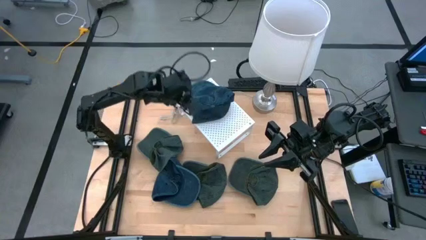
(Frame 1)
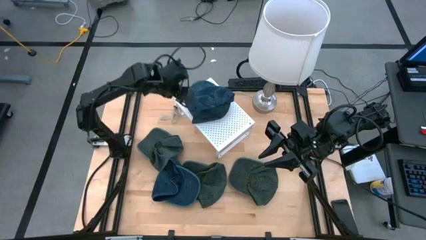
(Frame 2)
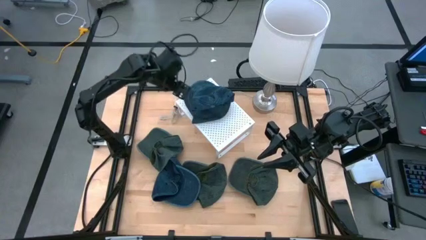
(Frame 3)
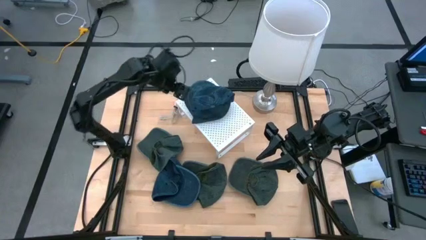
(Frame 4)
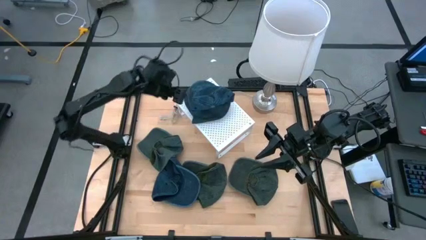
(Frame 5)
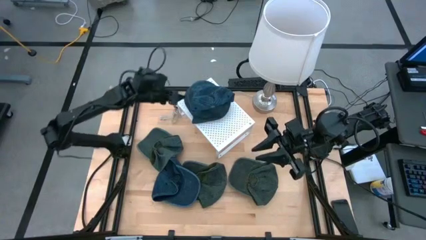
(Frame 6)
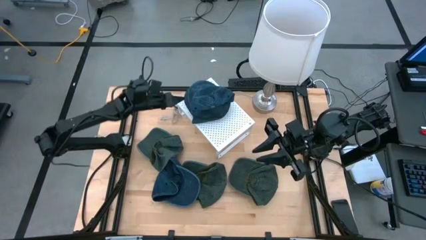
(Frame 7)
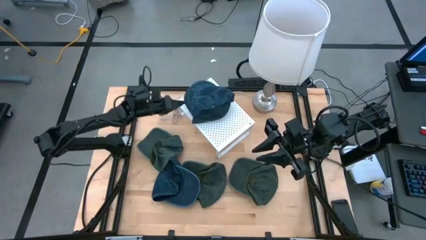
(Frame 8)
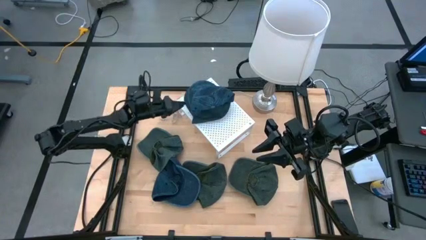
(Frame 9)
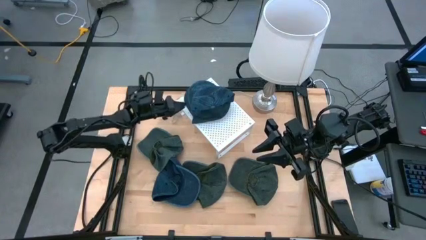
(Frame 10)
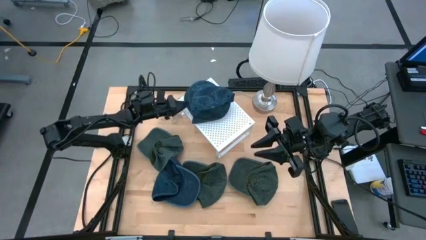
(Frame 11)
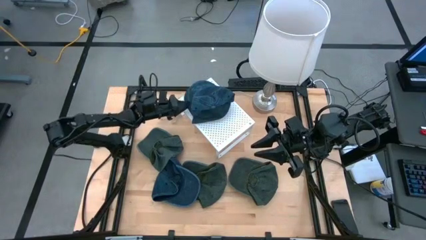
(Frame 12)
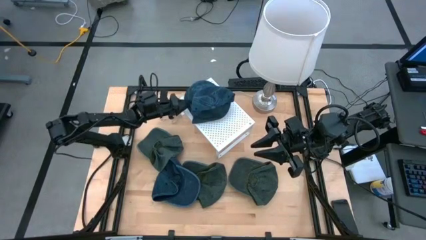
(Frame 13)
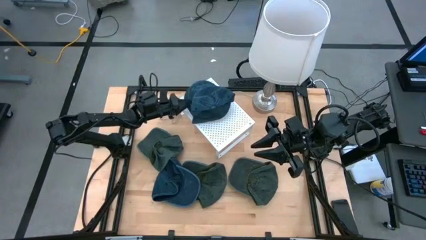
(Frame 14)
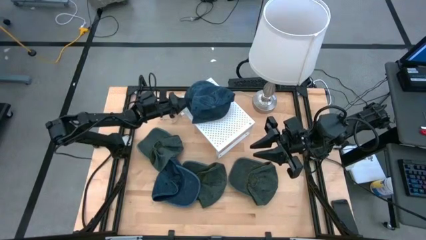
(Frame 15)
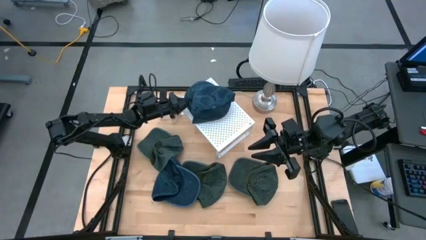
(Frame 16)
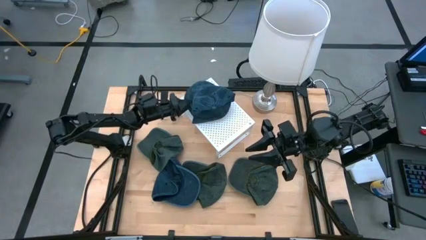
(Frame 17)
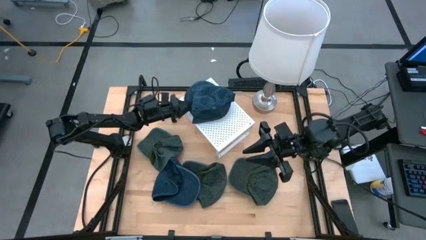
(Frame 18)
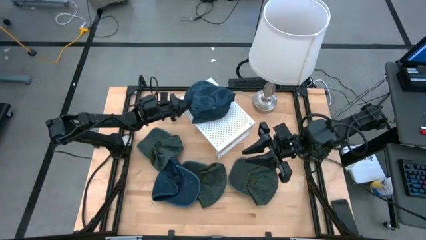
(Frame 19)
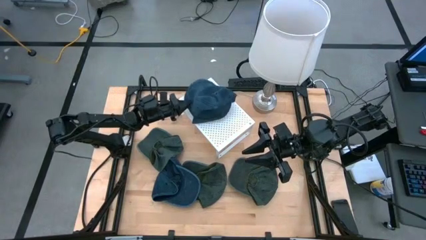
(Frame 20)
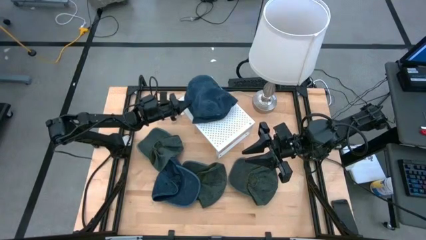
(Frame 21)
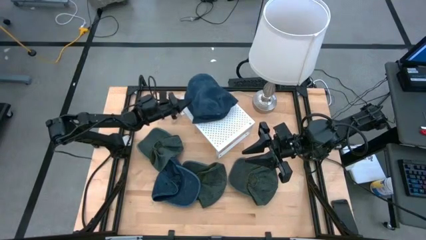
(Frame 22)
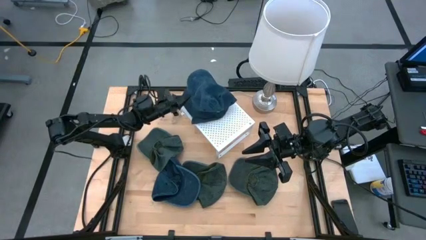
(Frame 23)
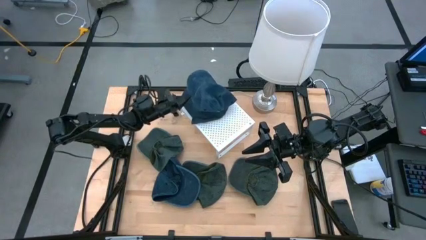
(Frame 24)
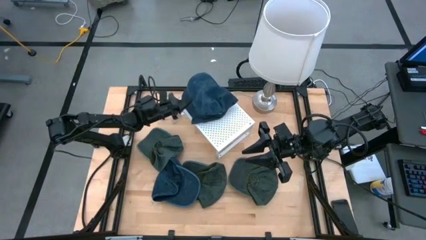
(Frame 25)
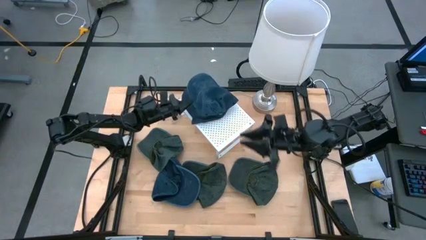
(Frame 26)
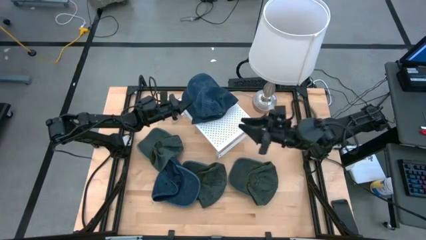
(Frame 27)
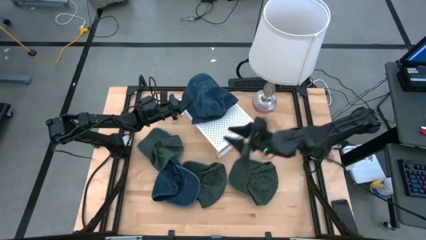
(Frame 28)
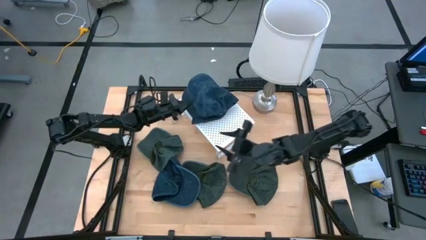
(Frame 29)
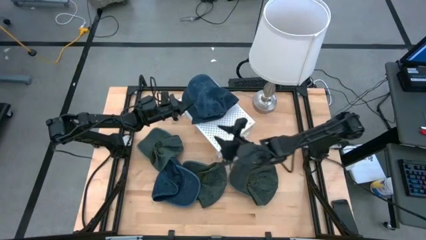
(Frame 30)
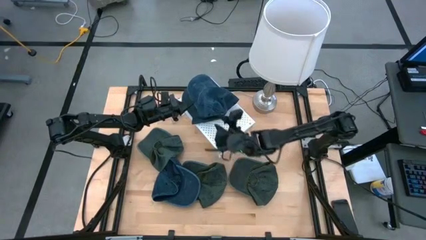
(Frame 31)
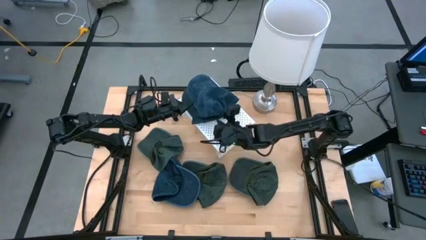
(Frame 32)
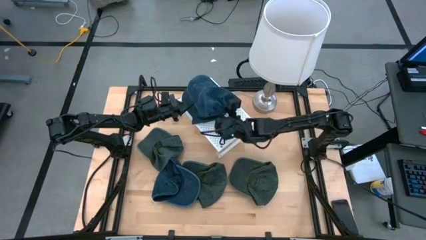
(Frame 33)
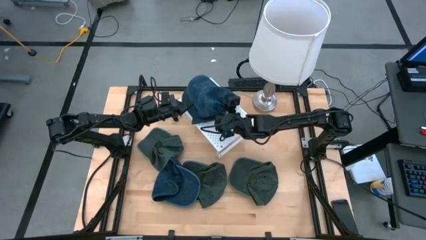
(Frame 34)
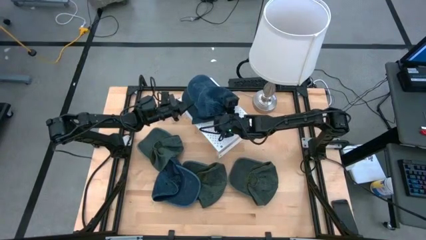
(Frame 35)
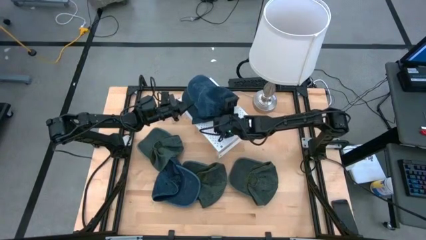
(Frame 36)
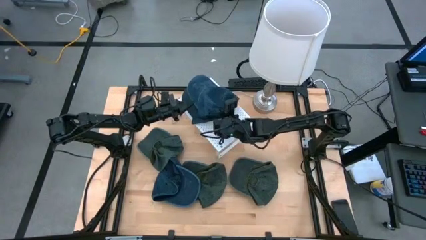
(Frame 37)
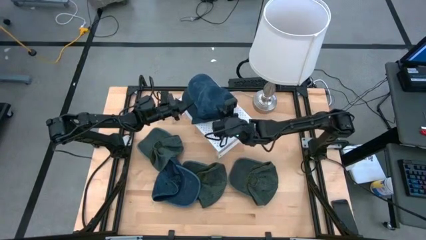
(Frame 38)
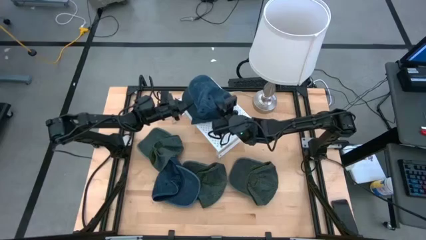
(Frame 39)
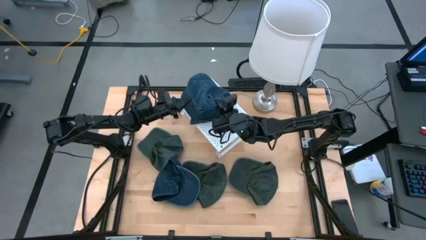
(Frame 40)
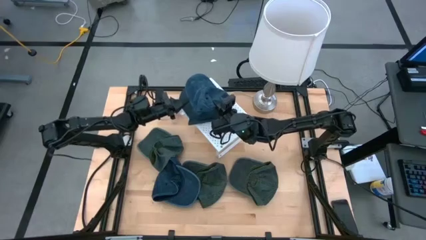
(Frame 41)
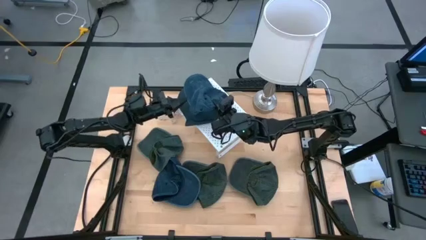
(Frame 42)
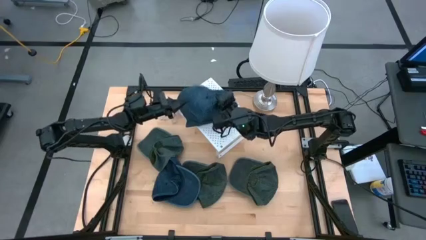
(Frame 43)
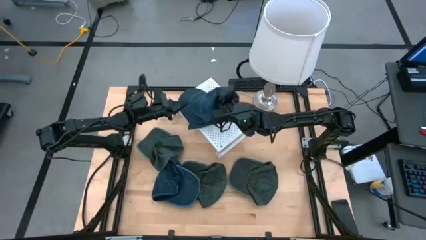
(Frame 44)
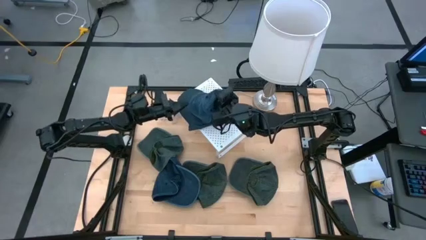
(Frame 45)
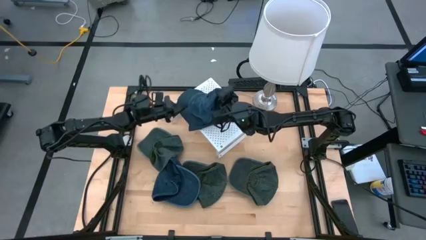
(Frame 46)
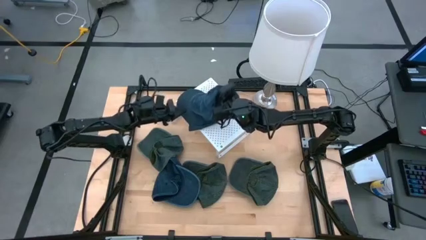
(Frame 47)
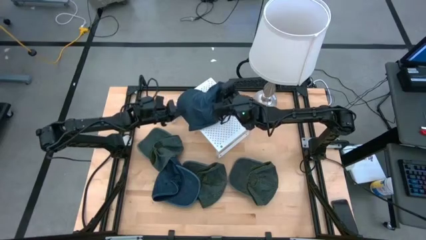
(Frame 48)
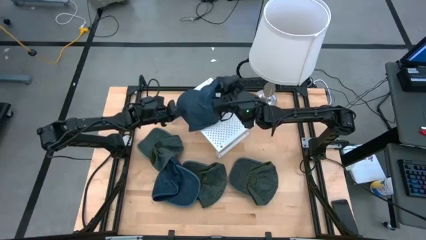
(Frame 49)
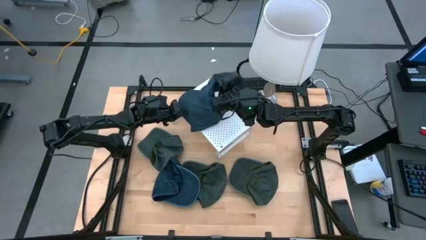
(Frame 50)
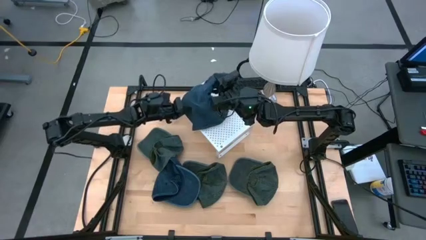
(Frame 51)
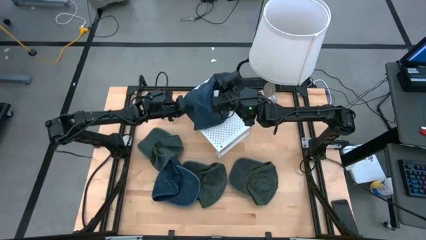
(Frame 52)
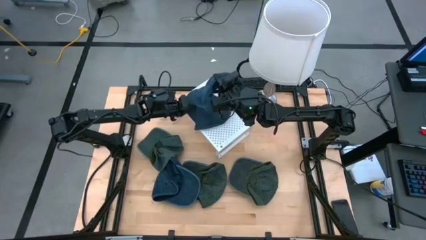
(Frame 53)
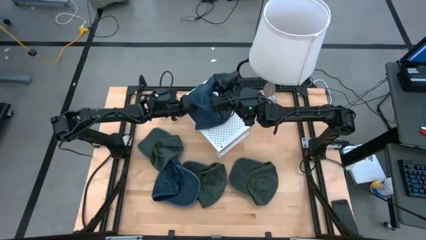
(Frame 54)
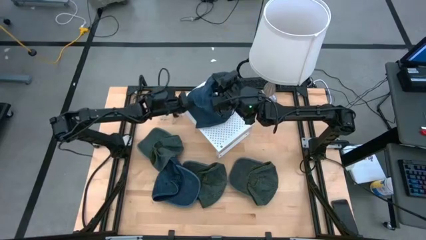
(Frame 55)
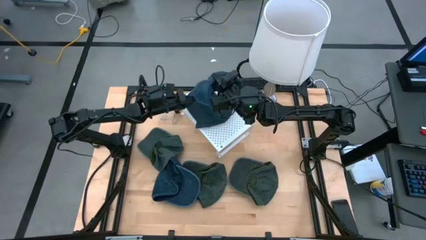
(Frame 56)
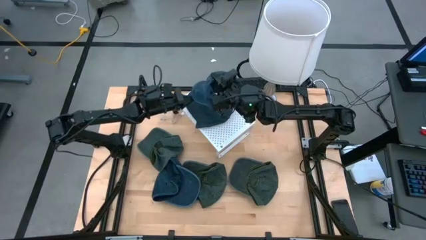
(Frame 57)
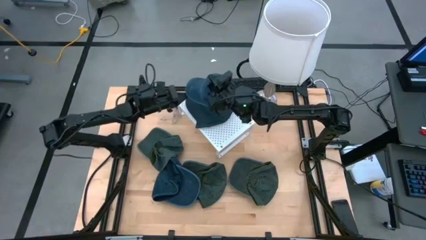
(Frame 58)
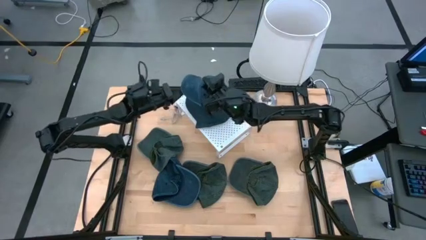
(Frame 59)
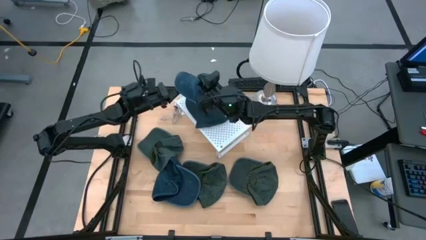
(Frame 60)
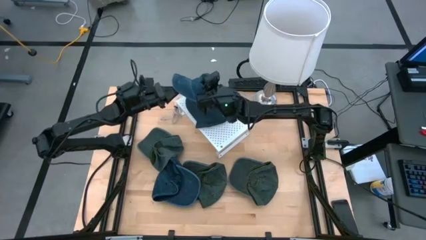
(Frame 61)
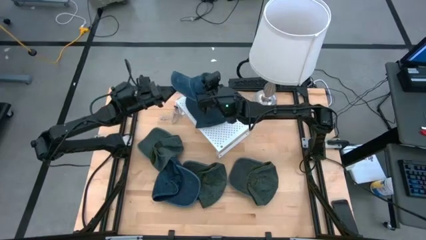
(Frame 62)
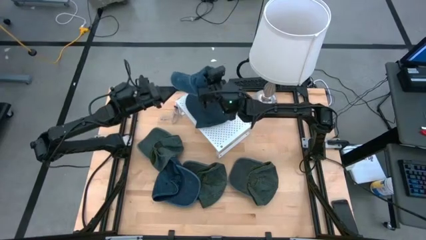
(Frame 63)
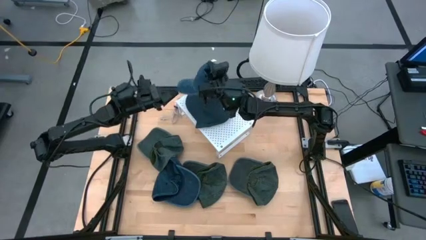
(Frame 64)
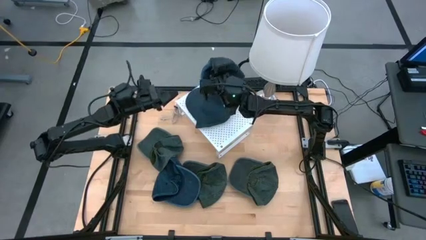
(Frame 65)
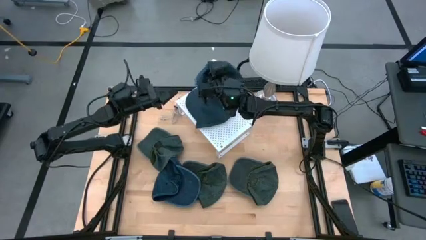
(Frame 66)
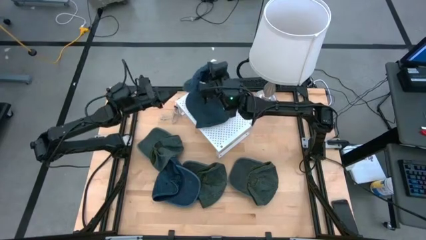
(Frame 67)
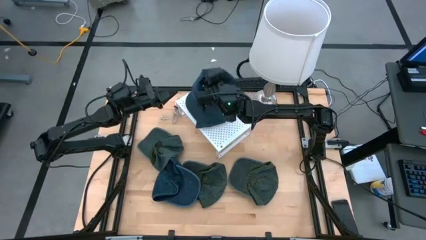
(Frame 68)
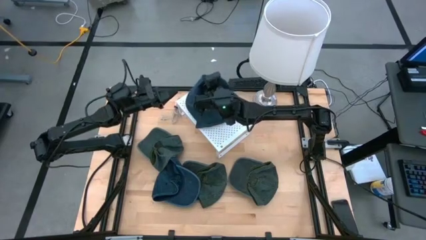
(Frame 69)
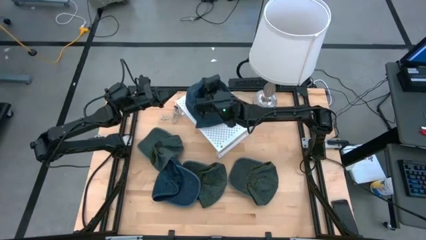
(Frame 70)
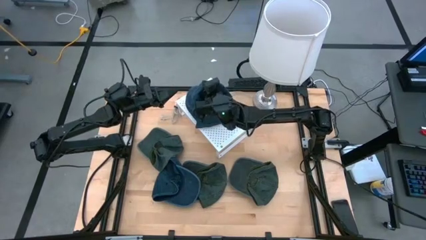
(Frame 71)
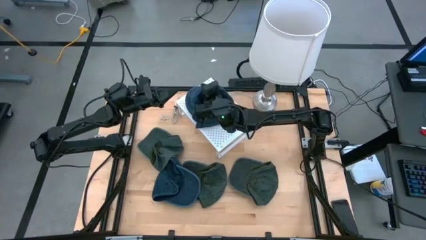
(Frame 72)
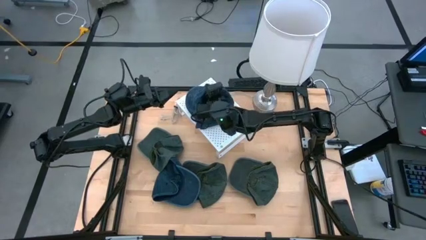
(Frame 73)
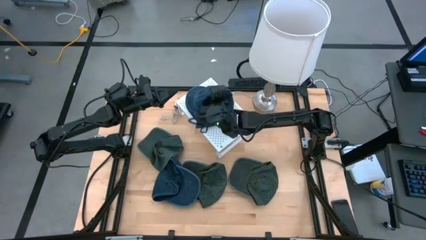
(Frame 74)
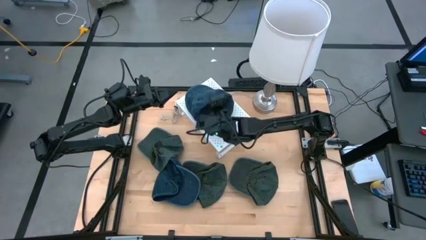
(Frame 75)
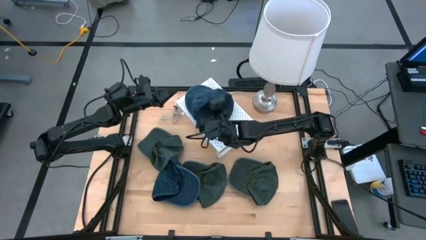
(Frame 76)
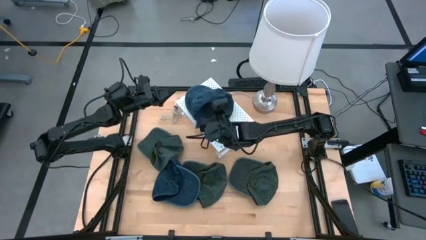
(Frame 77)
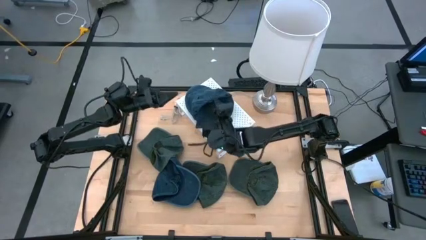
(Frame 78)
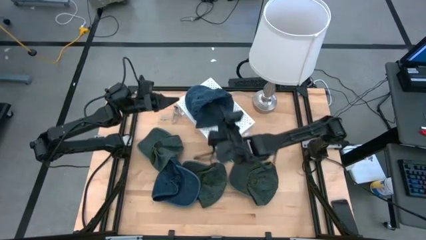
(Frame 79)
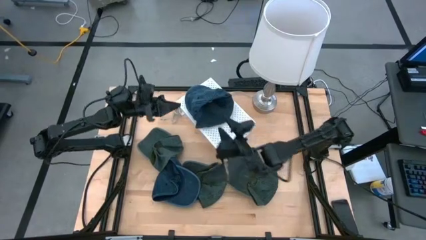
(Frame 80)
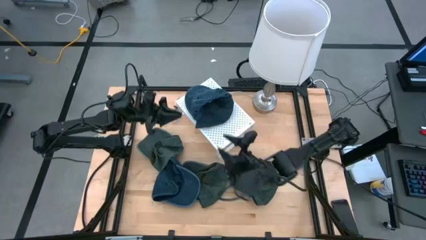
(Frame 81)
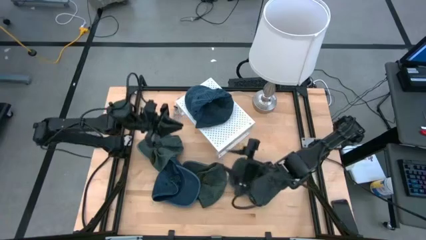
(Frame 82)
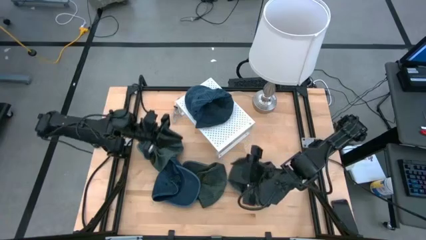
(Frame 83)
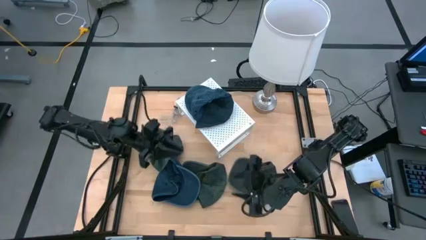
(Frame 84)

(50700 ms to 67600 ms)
Task: Pick & Place hat
Stack the top blue cap on the blue cap on the shelf
